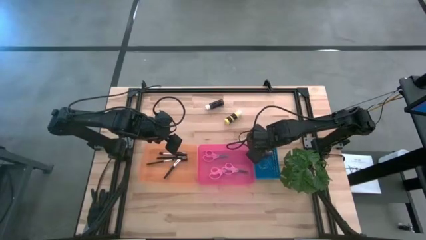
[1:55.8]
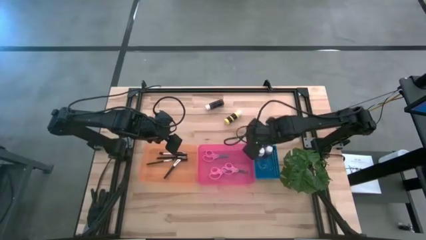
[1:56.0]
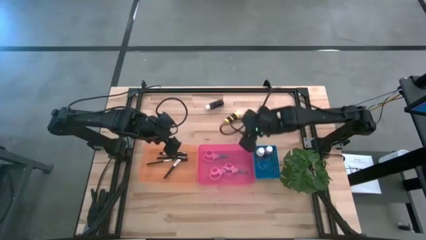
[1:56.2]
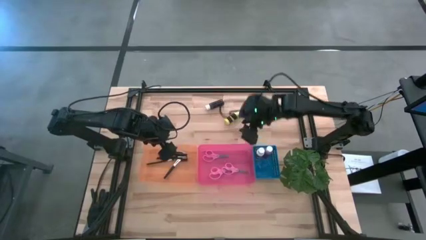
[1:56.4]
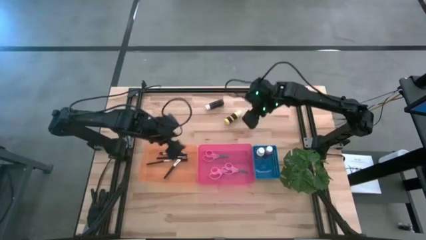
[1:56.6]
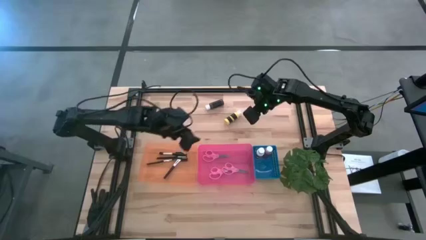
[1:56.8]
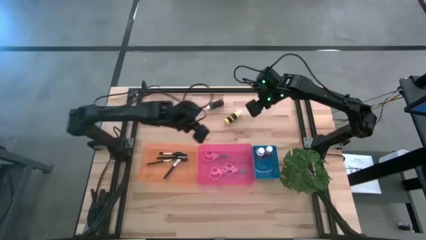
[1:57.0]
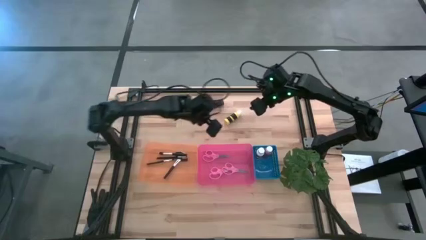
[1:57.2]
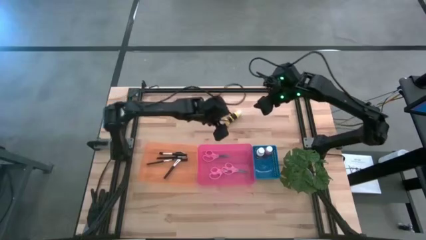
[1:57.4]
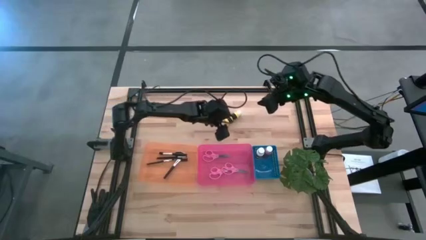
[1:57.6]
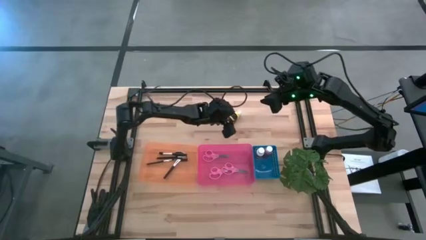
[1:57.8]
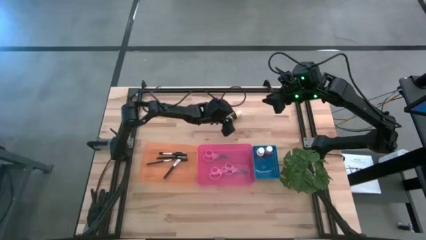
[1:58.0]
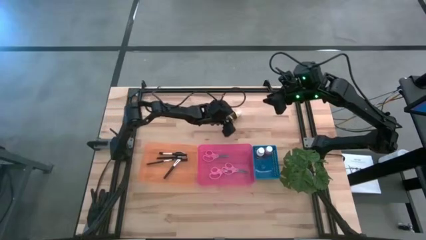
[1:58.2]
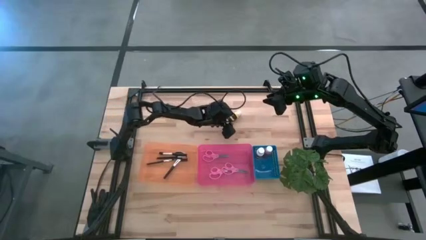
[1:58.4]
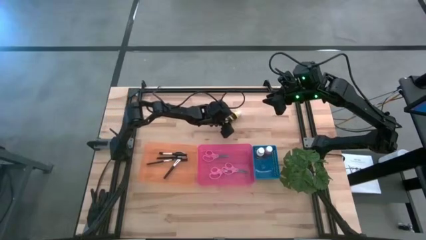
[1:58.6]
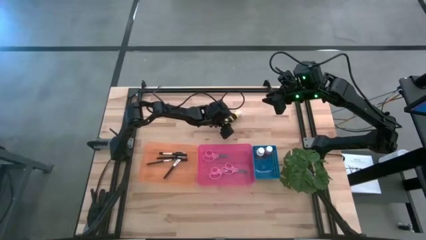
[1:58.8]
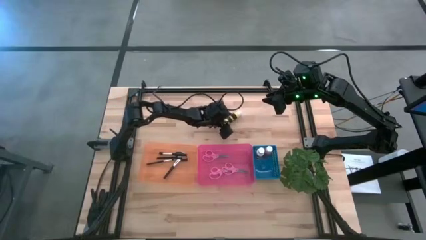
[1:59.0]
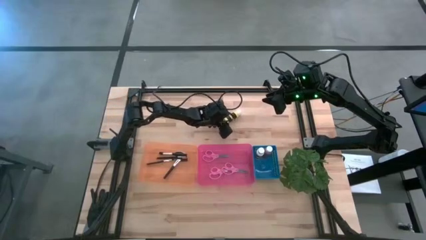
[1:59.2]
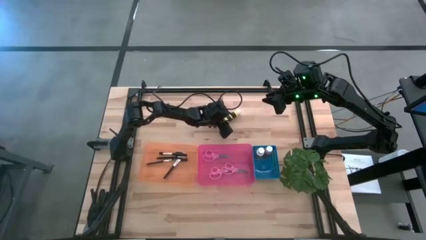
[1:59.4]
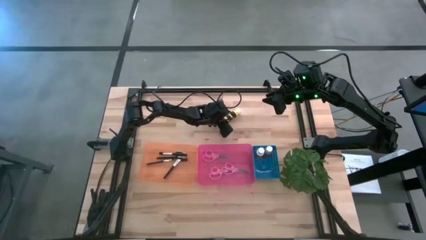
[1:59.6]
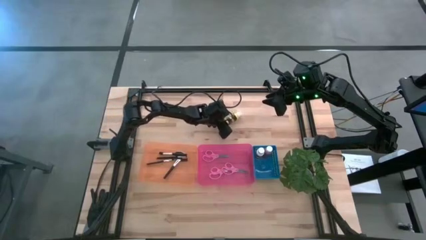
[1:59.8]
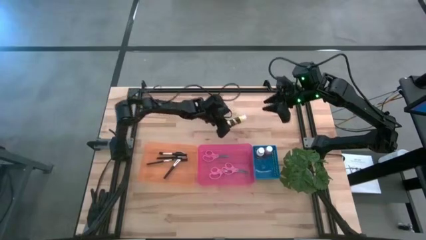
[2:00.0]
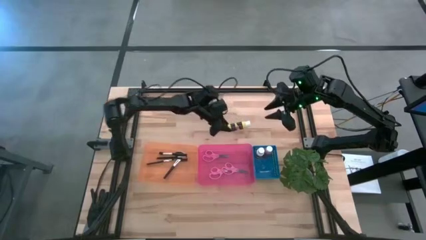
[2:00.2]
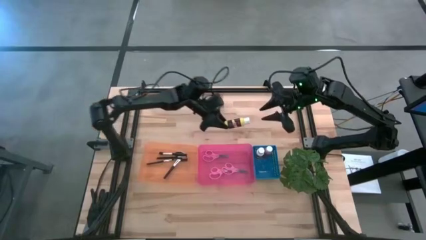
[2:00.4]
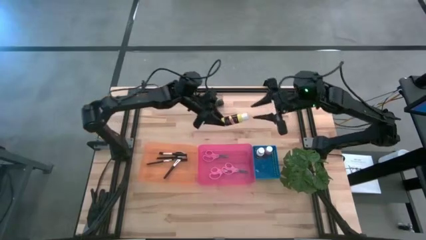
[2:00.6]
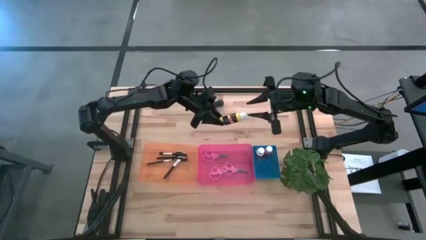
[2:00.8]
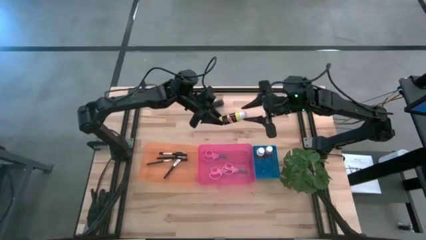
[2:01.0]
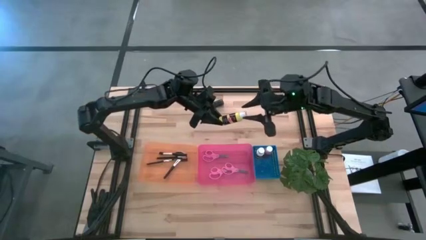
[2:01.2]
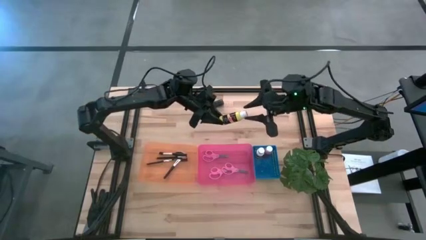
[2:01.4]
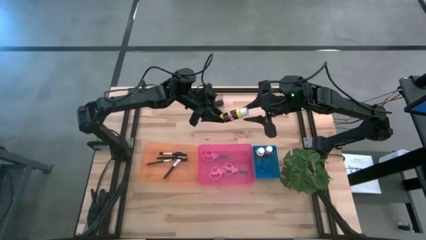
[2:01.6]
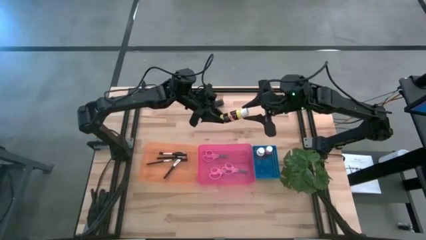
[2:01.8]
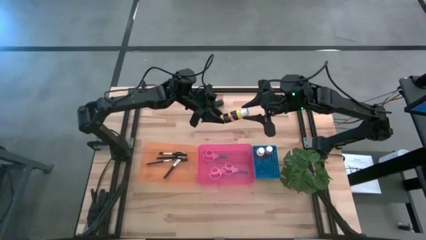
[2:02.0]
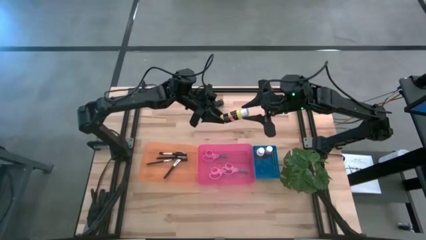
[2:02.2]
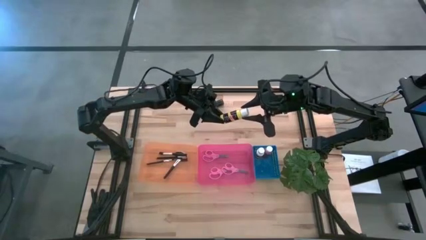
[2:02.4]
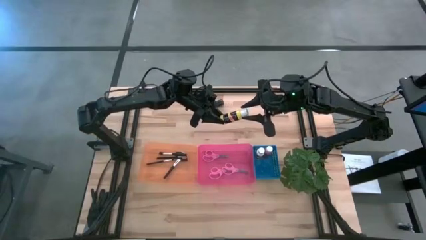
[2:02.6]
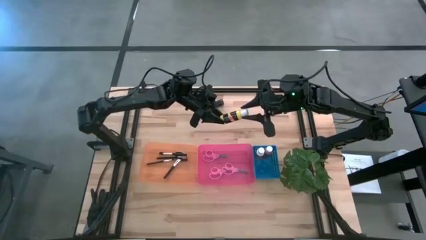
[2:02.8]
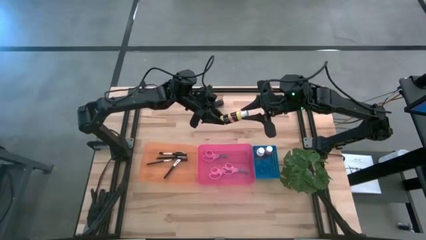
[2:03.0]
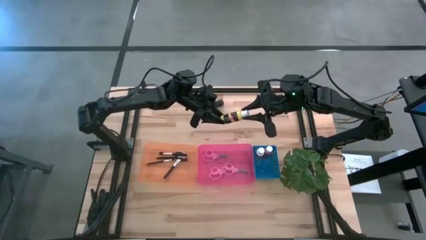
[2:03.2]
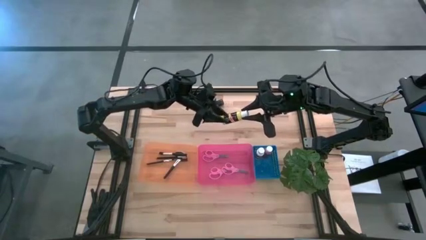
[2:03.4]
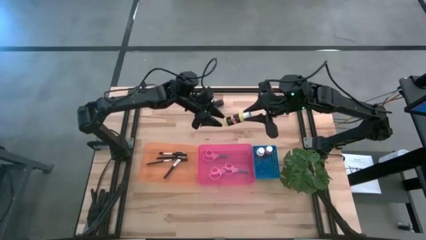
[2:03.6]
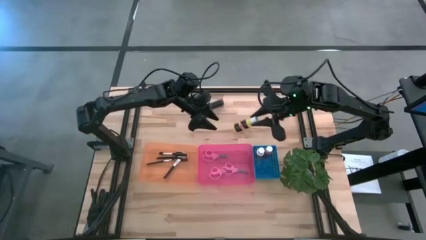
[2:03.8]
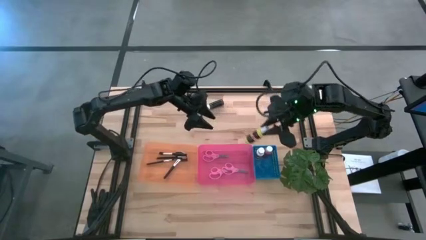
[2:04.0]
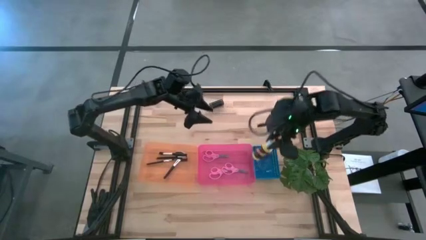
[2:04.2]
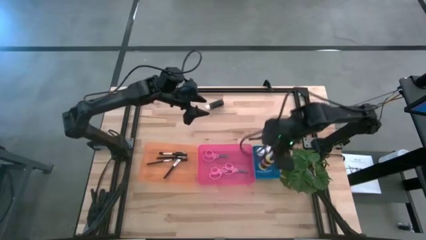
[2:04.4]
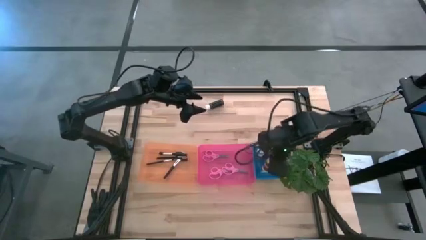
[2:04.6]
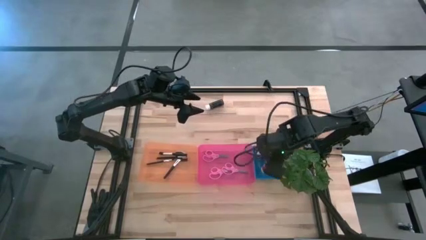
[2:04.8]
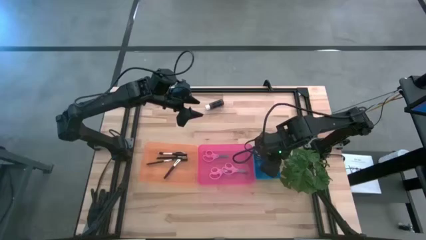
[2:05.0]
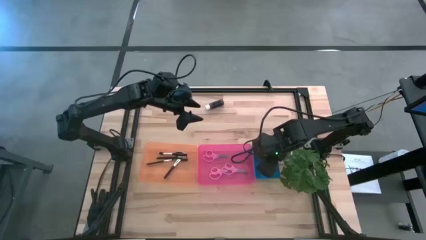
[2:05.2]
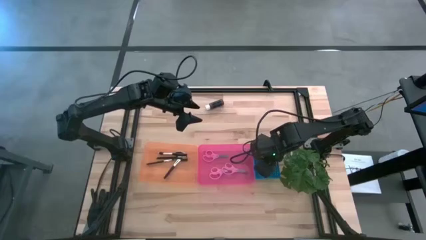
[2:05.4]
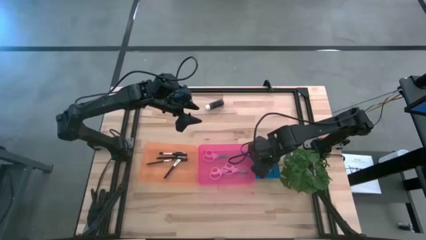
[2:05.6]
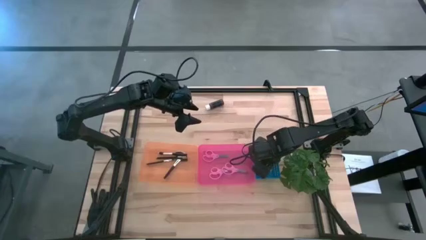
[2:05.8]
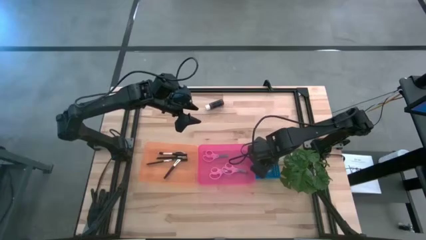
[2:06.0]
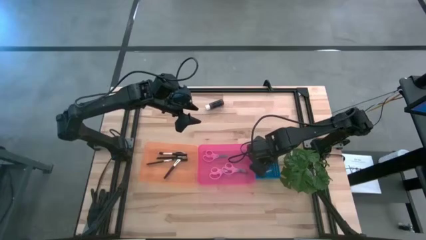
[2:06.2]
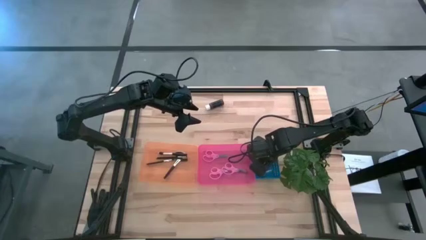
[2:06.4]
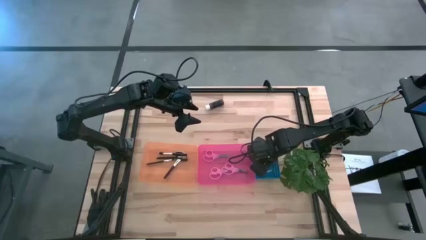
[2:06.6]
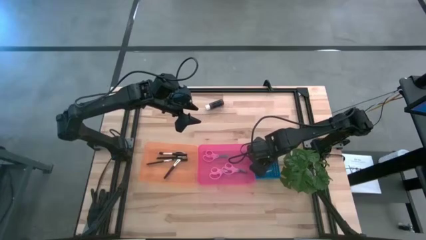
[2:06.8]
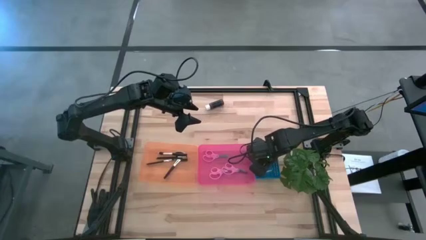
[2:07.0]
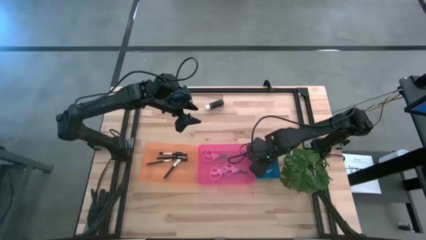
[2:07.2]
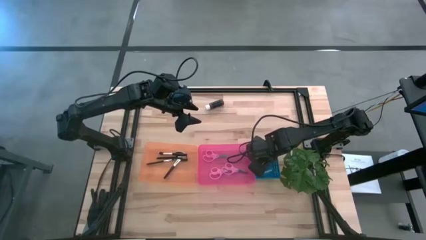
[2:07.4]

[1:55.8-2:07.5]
Task: Pick & Place Paint Supplies
Put the yellow paint bottle into the blue bin
